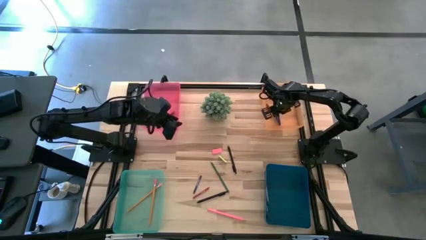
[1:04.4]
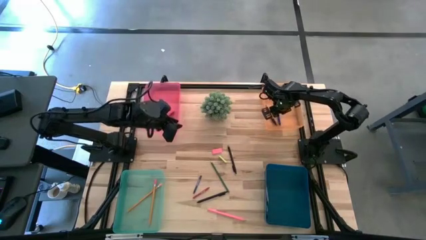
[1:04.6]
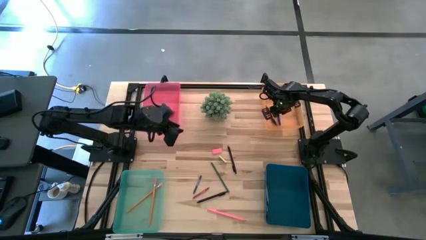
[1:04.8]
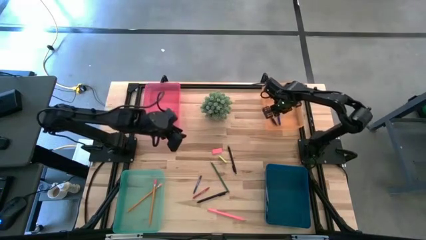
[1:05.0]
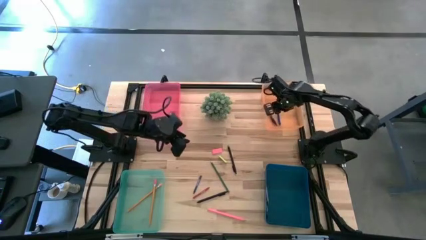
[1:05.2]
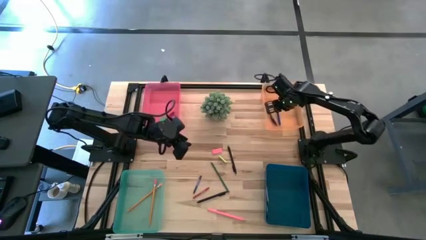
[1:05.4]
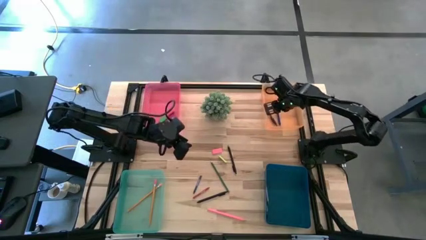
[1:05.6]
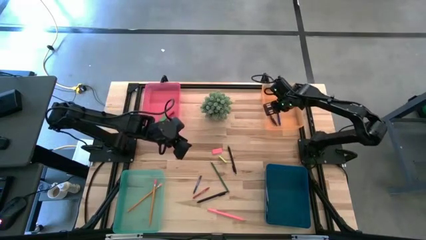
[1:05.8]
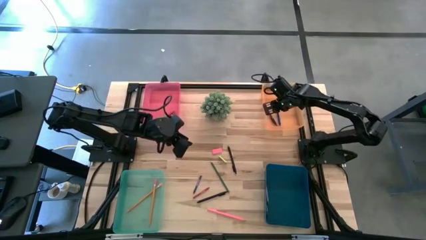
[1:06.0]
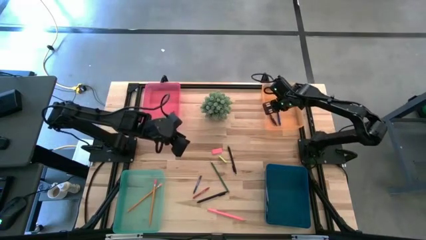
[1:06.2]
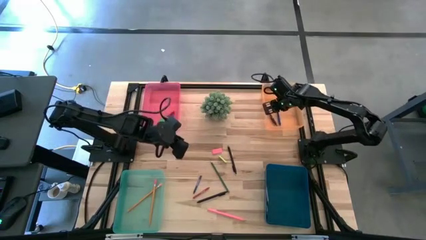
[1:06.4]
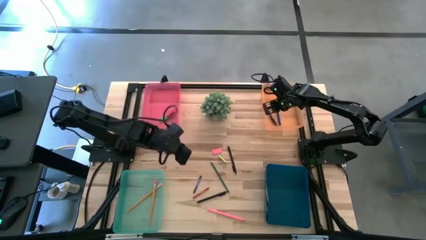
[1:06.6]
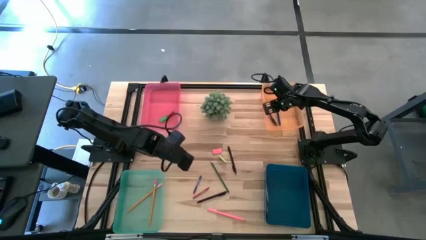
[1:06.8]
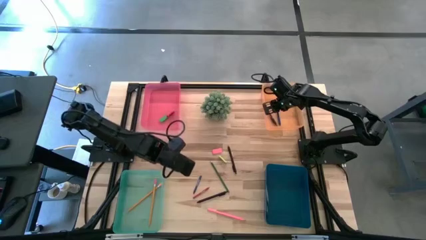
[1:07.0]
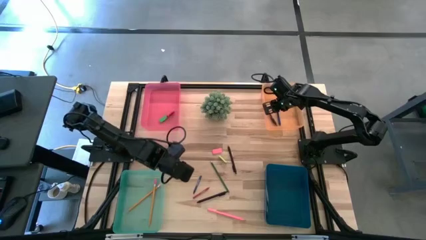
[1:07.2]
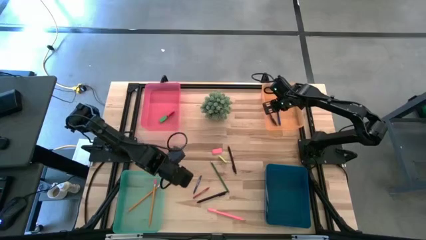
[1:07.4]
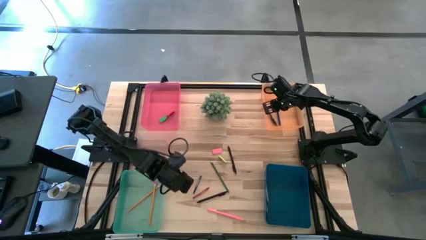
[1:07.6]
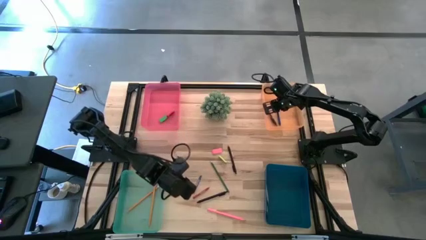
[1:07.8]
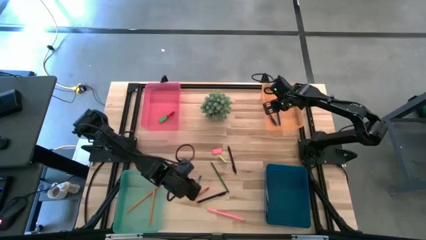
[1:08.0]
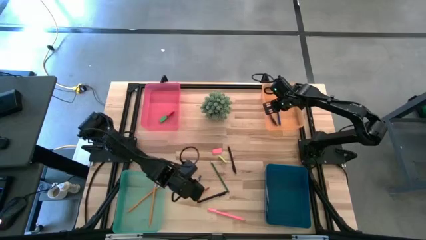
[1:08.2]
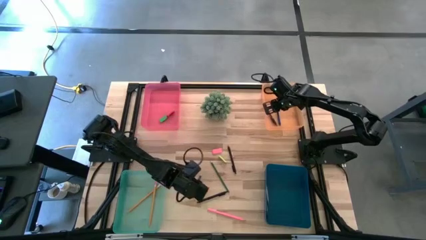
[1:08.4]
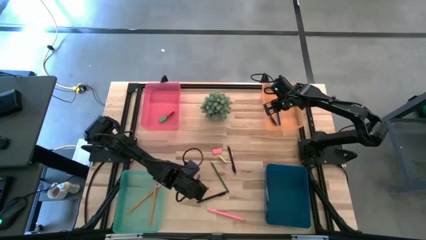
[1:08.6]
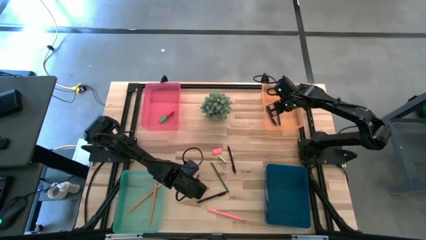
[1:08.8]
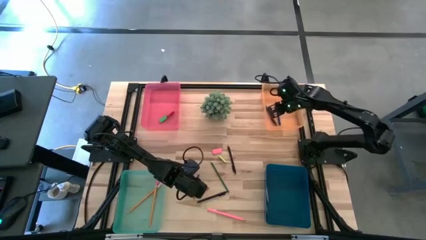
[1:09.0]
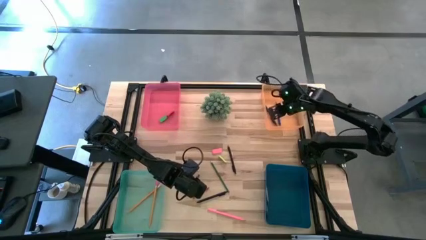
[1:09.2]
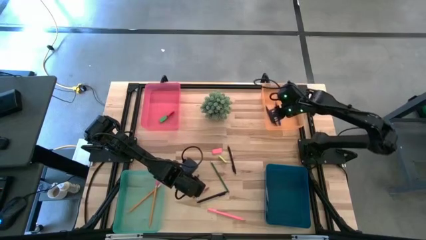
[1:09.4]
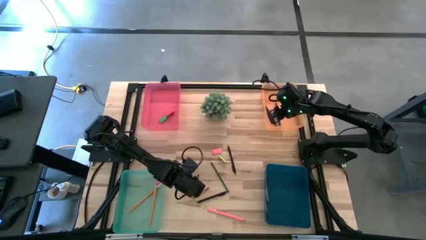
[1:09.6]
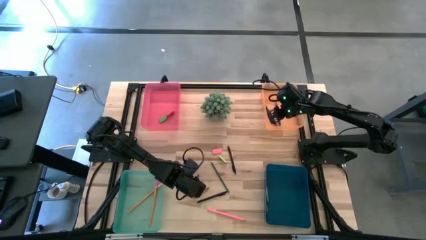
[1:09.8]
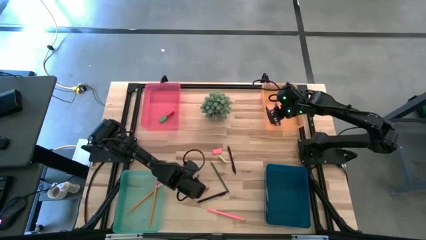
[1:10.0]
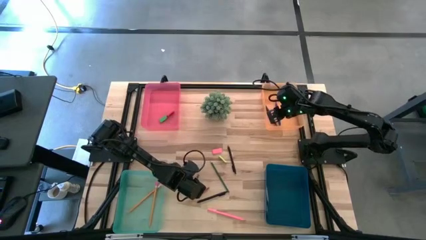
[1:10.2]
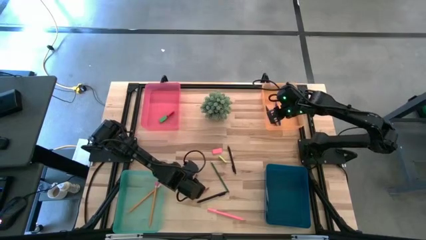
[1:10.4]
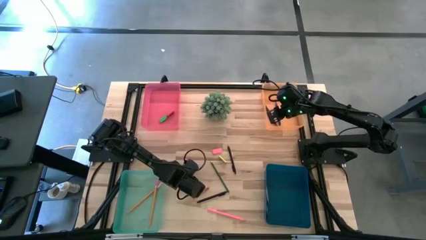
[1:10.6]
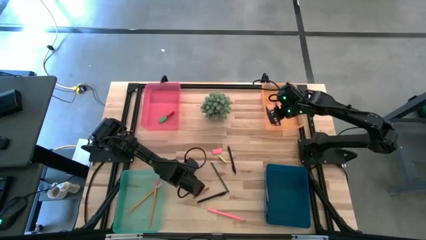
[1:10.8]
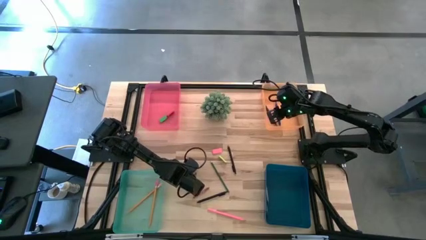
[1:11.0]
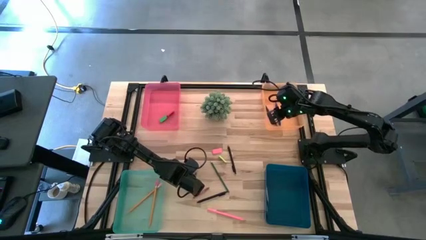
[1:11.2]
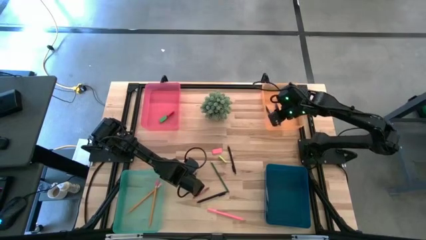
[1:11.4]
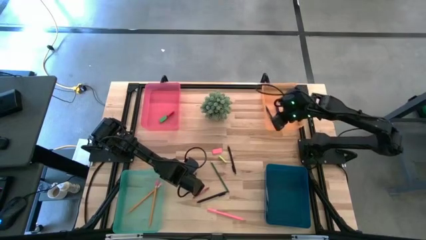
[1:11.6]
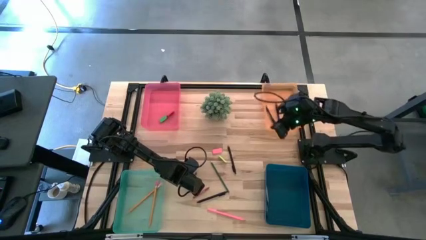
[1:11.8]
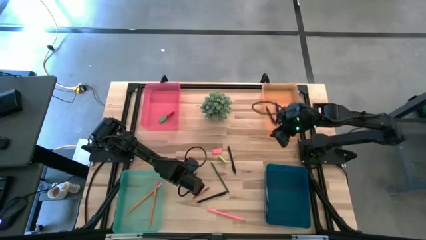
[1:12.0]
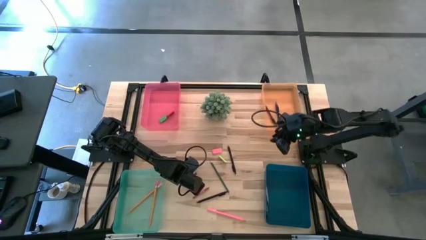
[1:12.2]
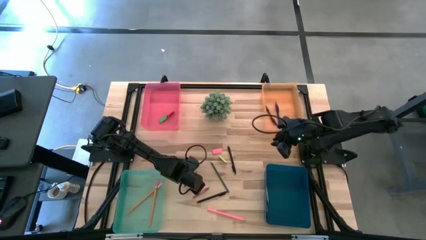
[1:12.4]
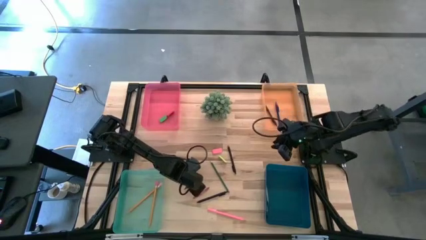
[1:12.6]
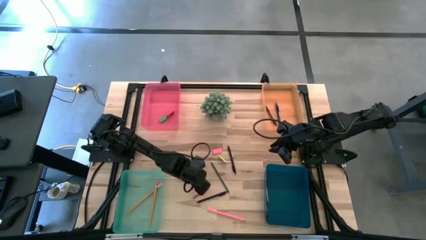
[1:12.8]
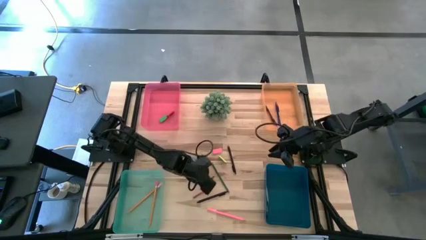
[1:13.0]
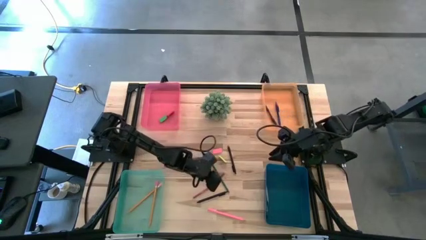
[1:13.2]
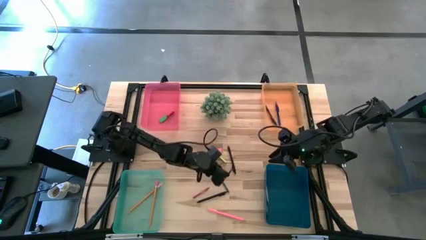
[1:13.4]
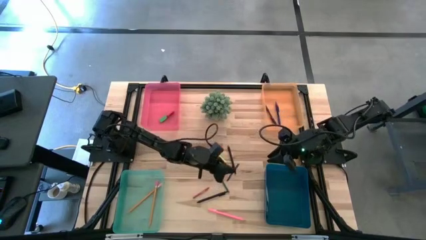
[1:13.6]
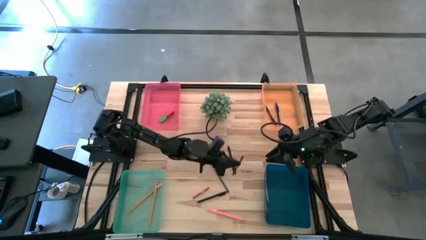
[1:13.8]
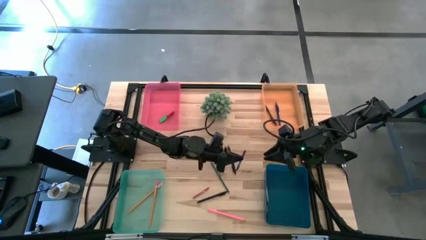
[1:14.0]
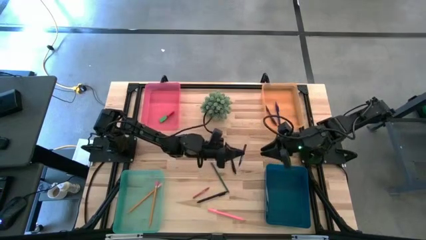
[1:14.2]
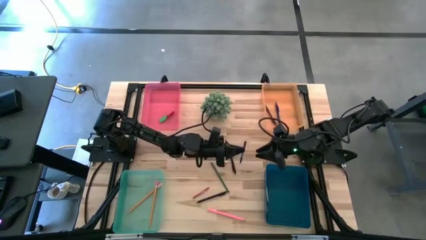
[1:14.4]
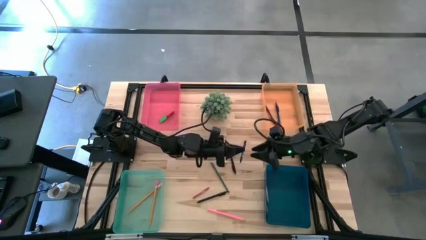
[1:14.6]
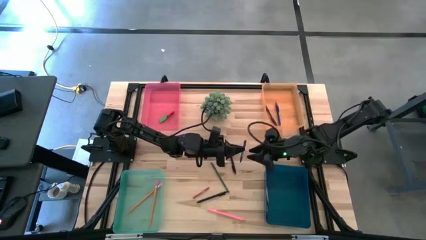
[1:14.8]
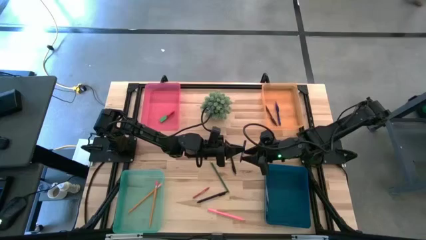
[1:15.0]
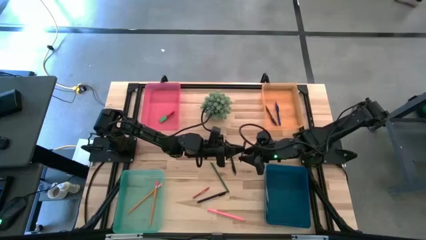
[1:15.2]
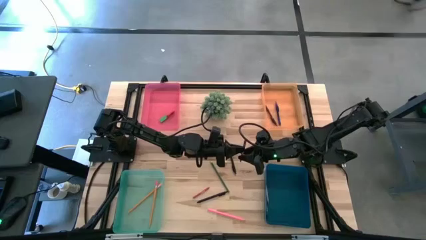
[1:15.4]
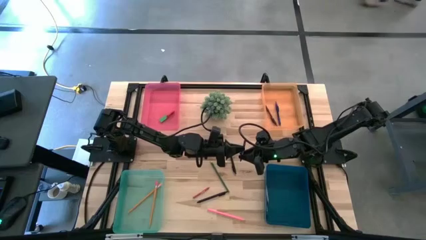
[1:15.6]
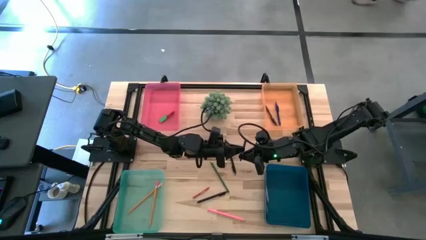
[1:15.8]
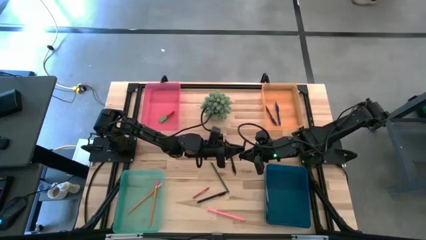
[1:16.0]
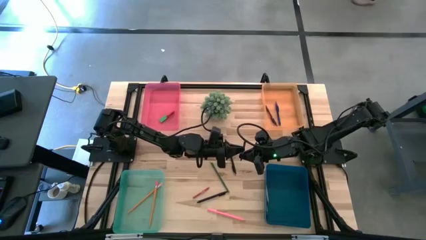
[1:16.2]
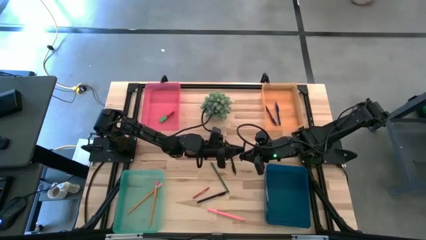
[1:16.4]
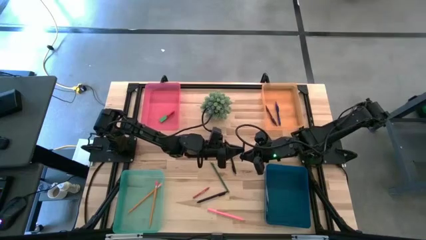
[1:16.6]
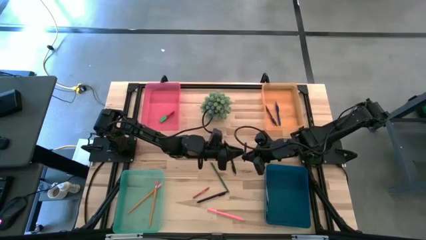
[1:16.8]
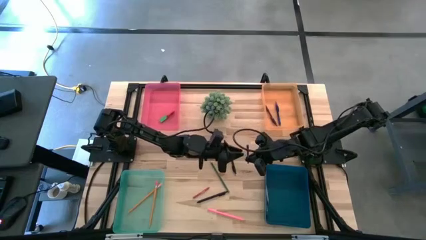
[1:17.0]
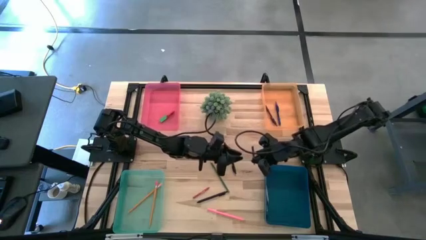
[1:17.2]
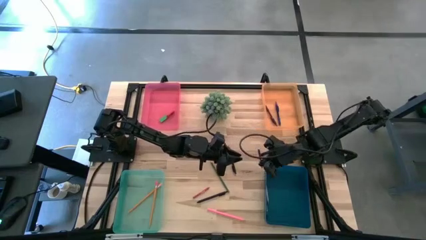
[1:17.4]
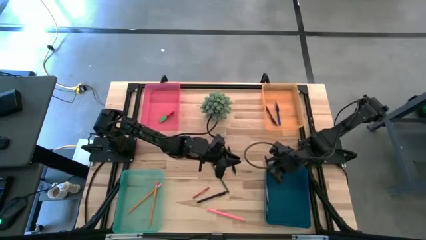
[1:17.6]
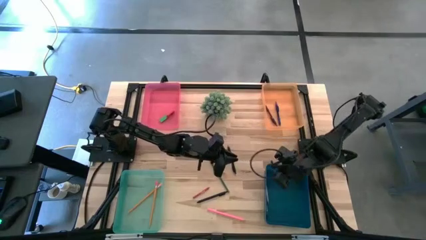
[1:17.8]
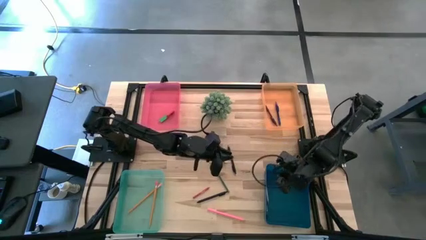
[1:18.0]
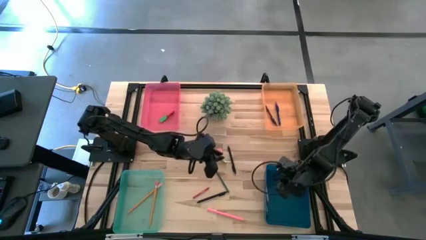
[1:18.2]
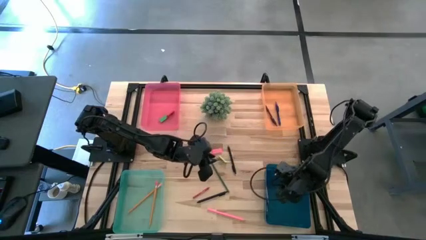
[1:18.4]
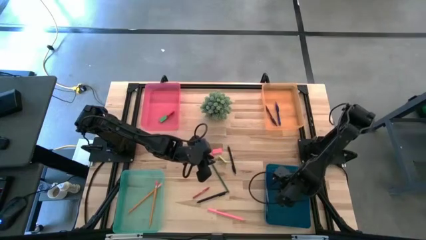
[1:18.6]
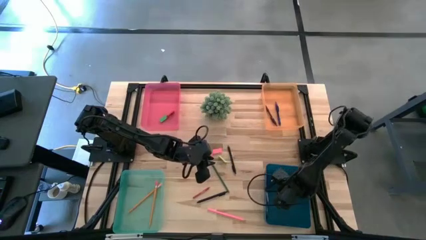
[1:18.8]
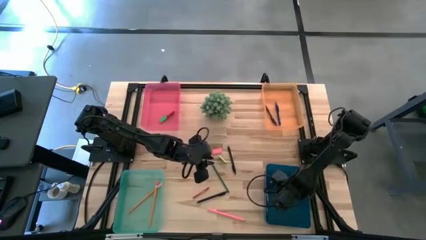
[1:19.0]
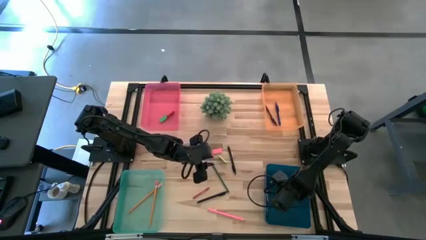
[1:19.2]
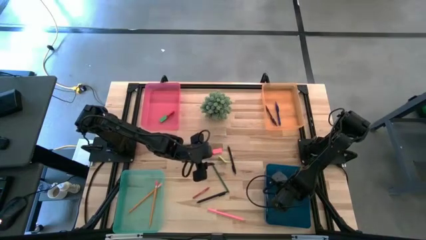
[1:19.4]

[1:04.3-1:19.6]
Task: Sort crayons/erasers/pens/pencils in bins
Put the blue crayon into the blue bin

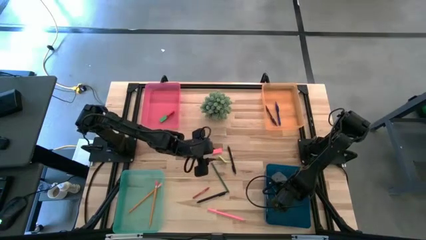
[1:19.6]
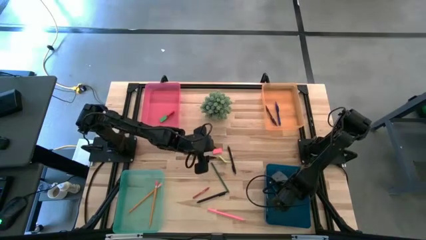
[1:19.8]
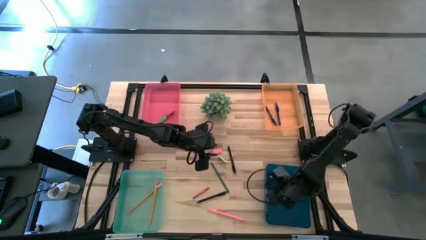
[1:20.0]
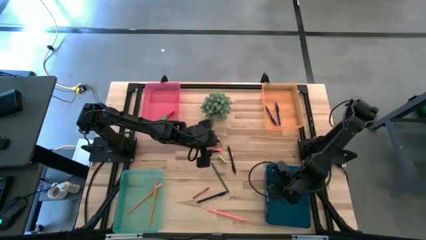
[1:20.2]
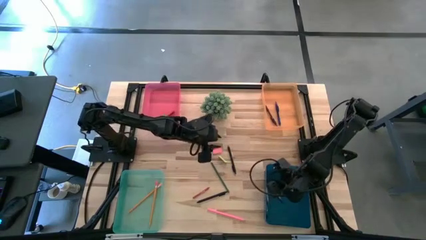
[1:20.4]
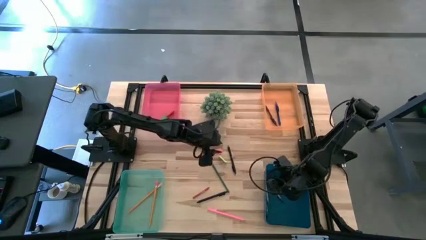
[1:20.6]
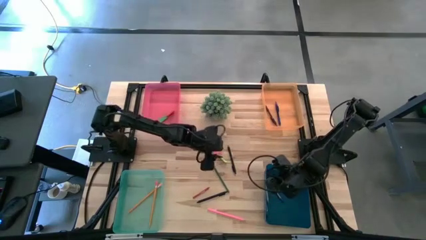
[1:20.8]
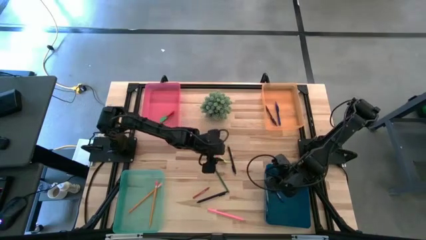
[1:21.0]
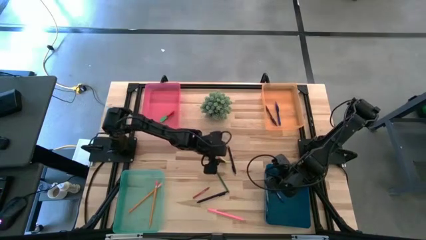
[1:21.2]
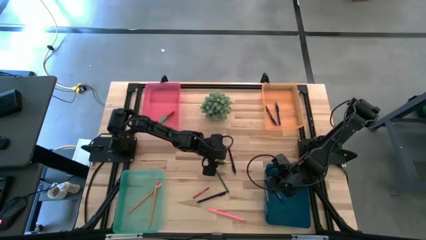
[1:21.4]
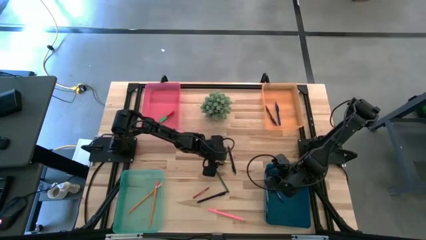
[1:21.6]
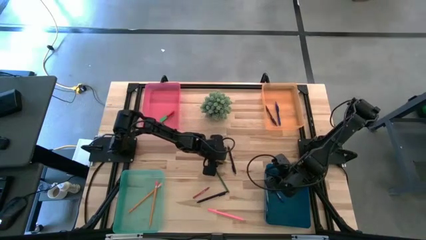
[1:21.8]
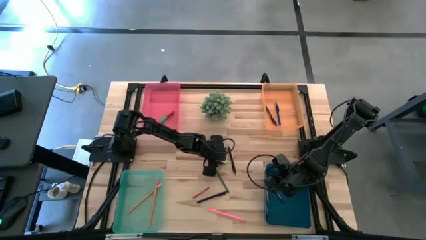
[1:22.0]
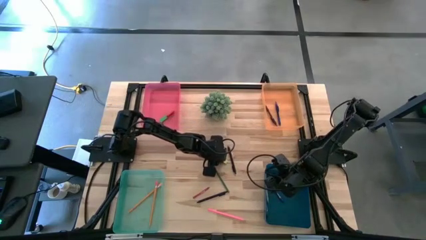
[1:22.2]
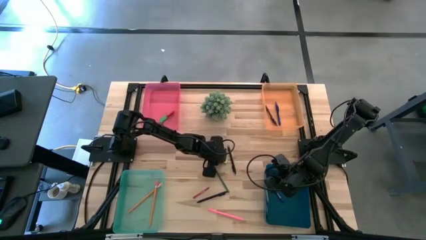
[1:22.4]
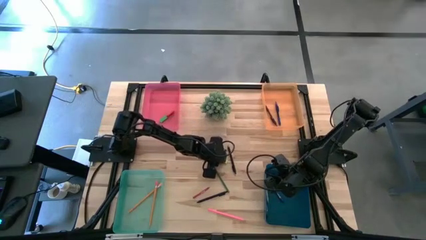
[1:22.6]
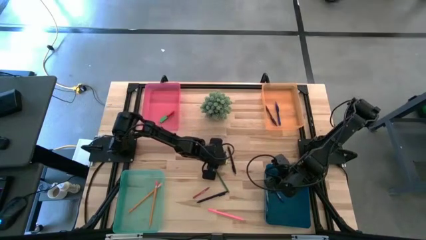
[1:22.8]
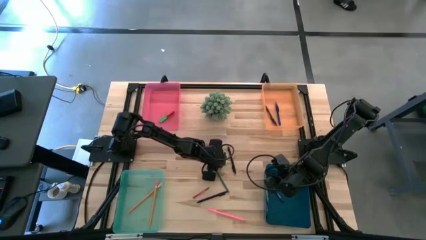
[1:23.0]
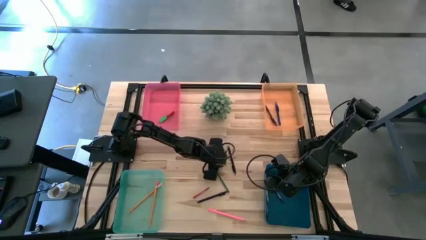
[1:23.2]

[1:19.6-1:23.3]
Put the light green eraser into the red bin
